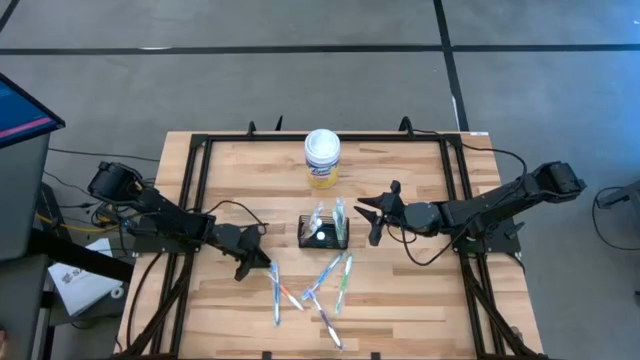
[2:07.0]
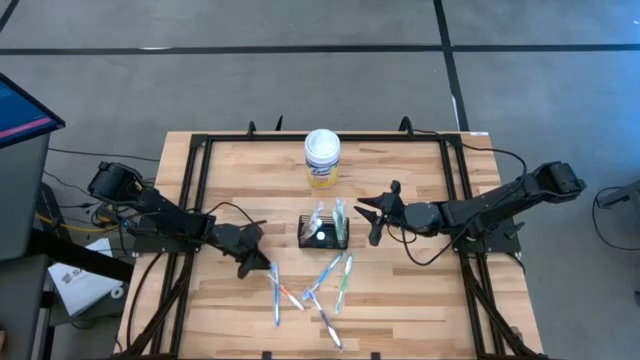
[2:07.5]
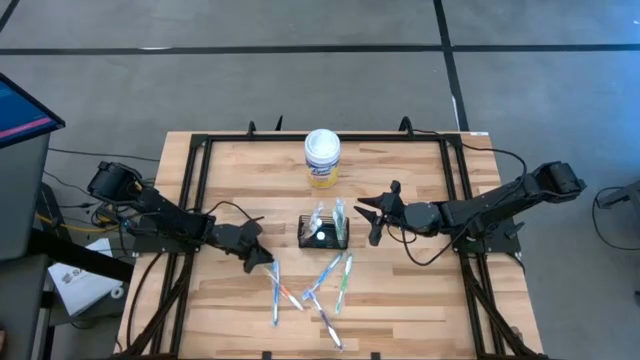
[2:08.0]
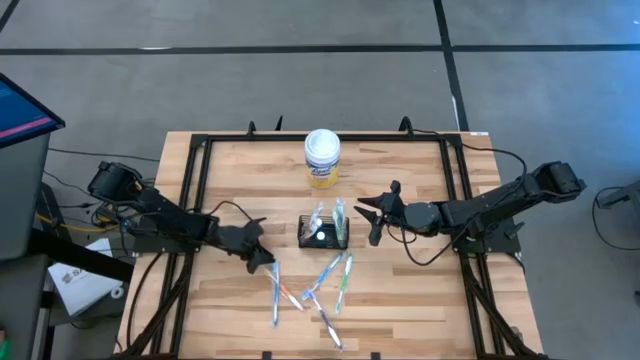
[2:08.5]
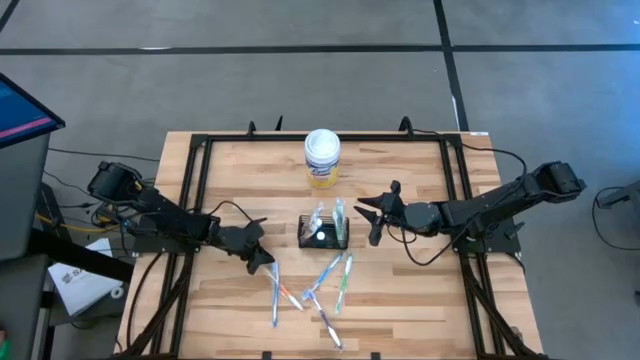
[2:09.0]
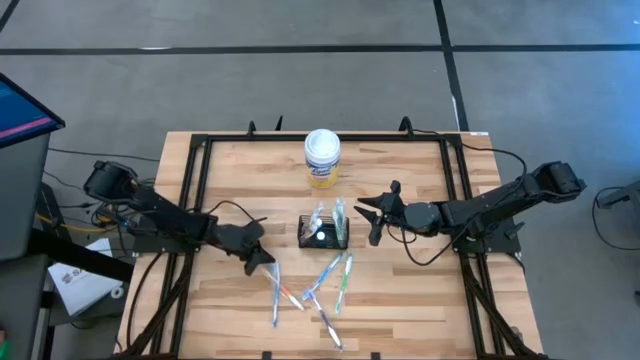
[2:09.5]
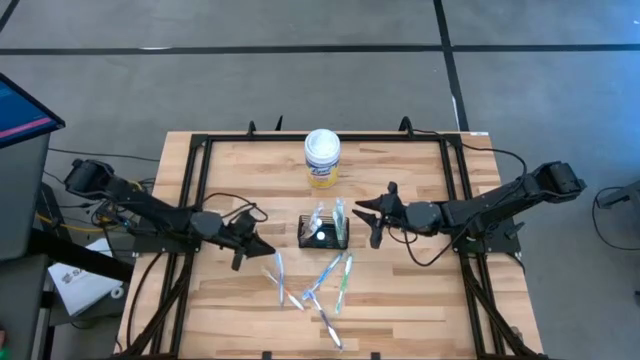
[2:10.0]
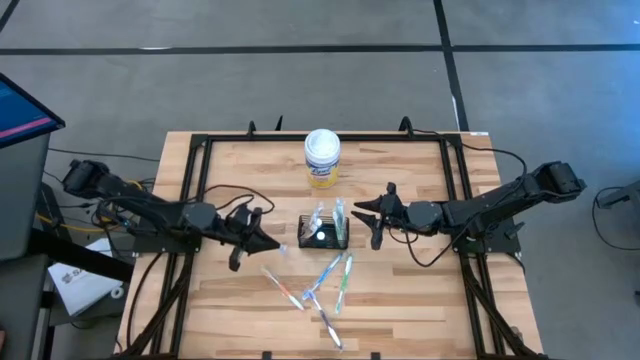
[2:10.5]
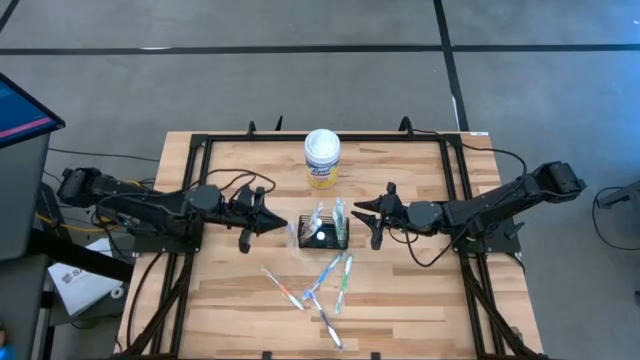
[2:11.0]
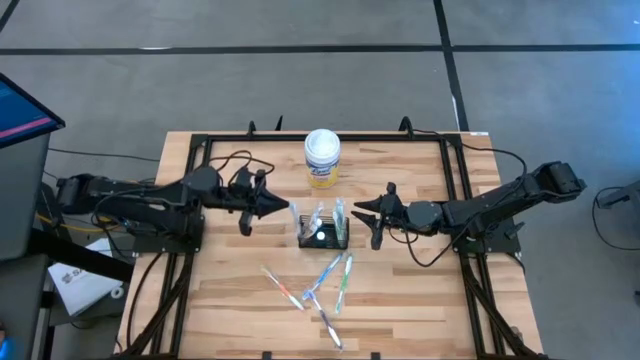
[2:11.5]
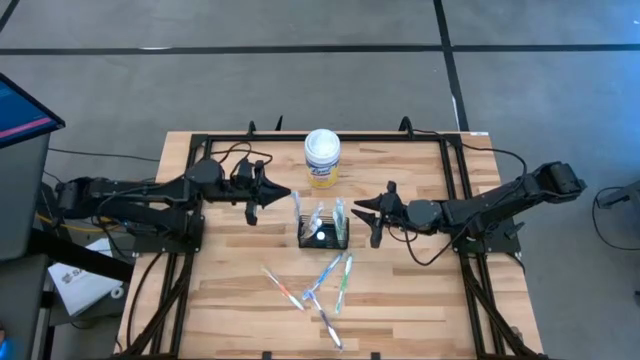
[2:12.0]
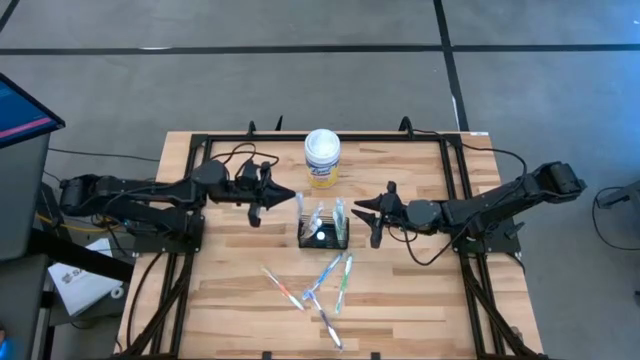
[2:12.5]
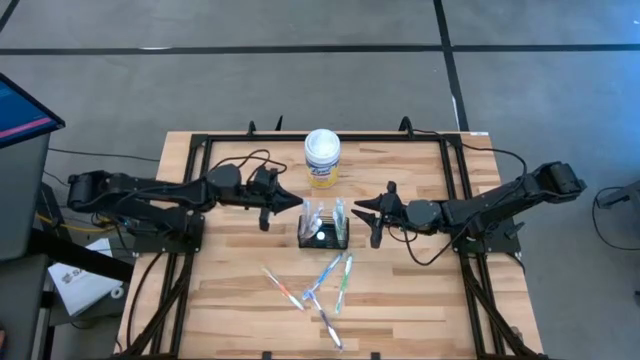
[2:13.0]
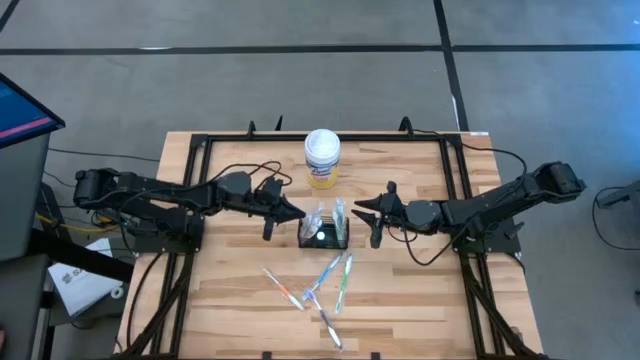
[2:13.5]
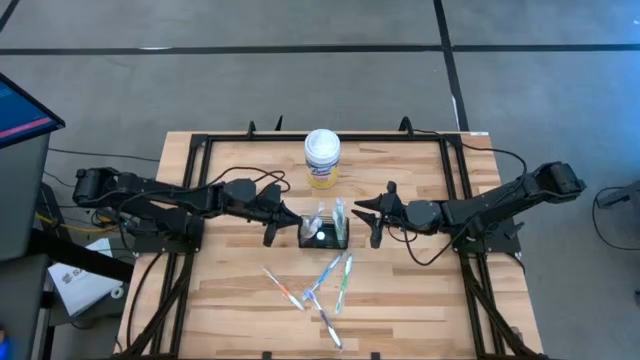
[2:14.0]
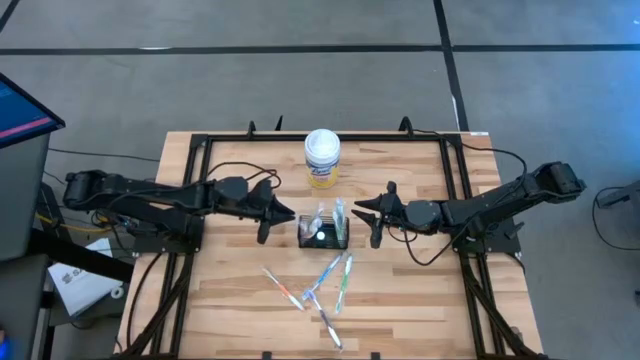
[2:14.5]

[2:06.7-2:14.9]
Task: Pick & Place toothbrushing station
Put the left blue toothbrush into the black mesh organizer

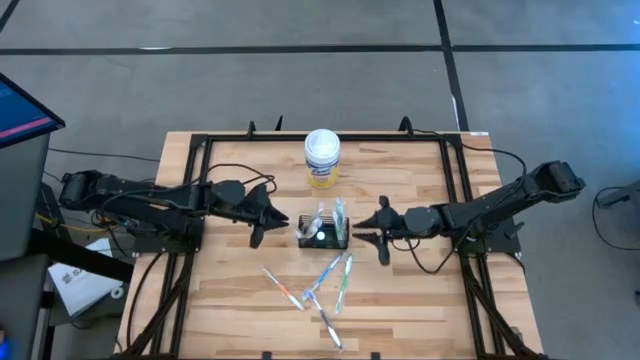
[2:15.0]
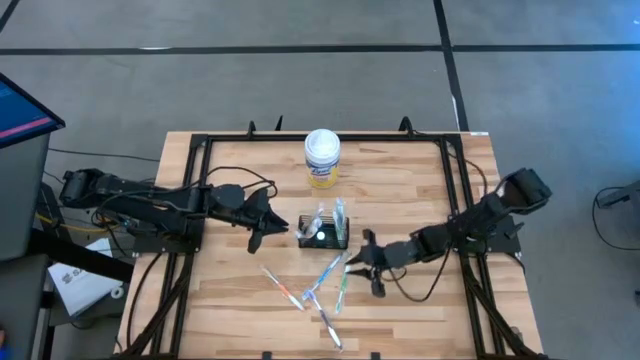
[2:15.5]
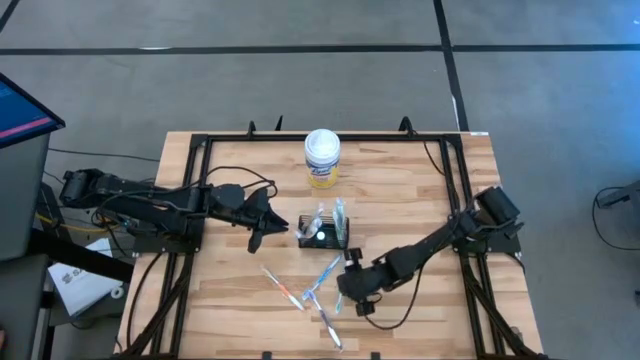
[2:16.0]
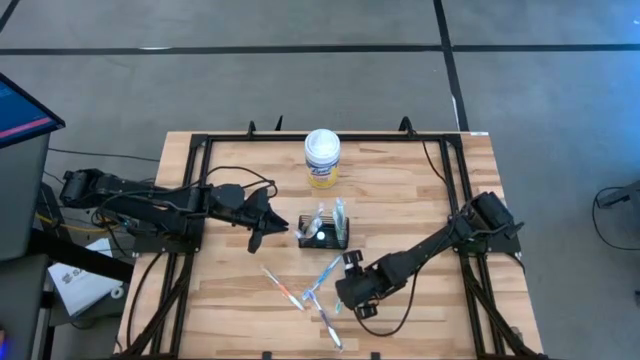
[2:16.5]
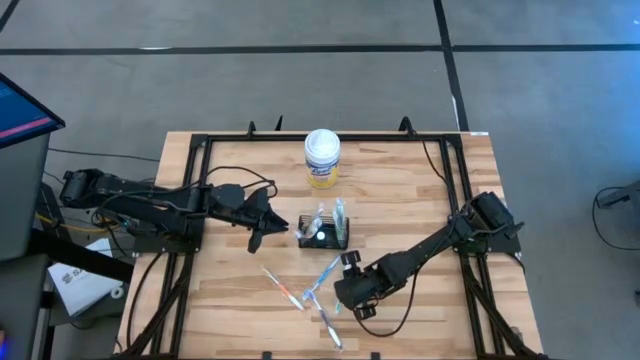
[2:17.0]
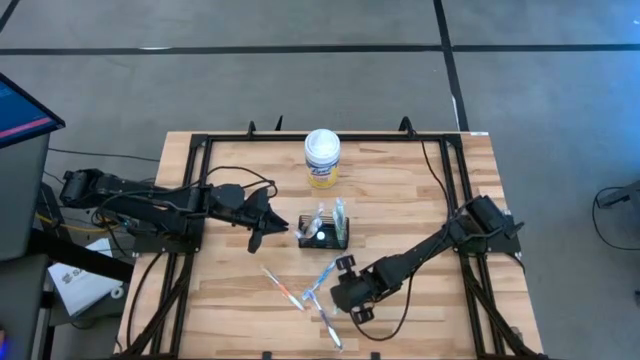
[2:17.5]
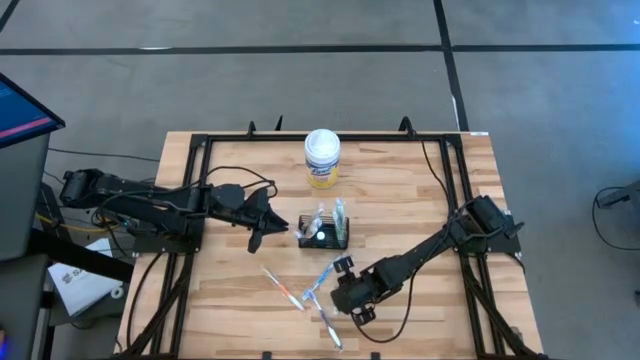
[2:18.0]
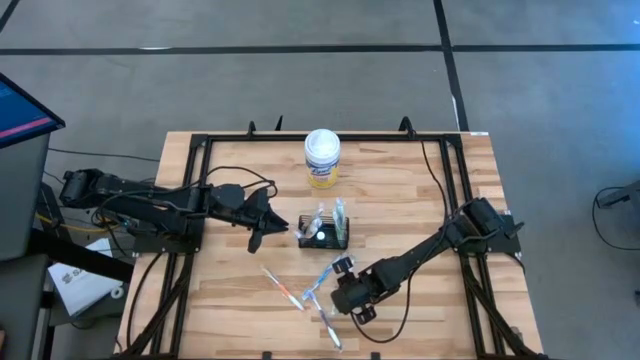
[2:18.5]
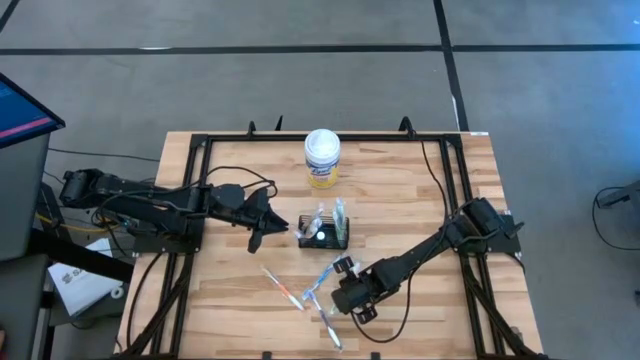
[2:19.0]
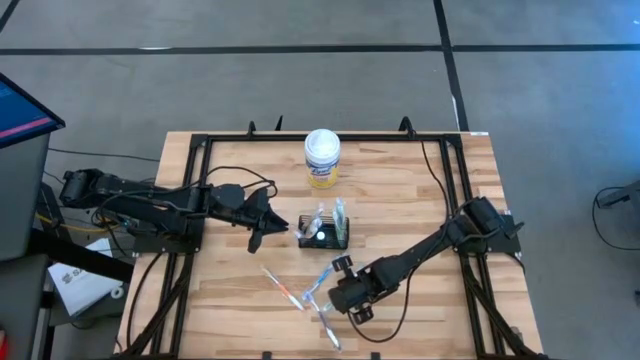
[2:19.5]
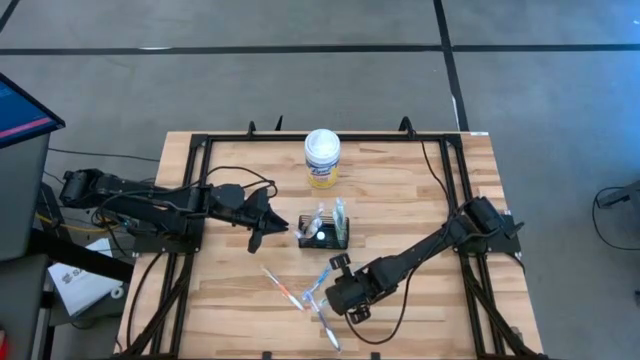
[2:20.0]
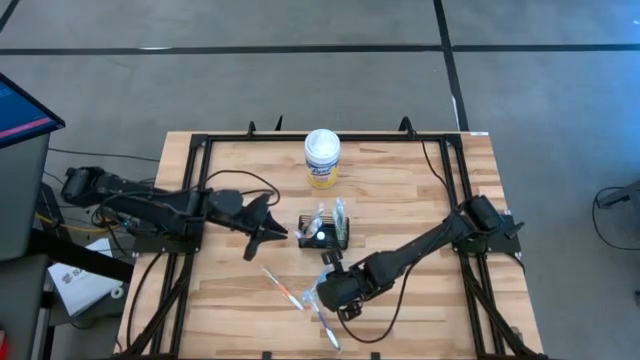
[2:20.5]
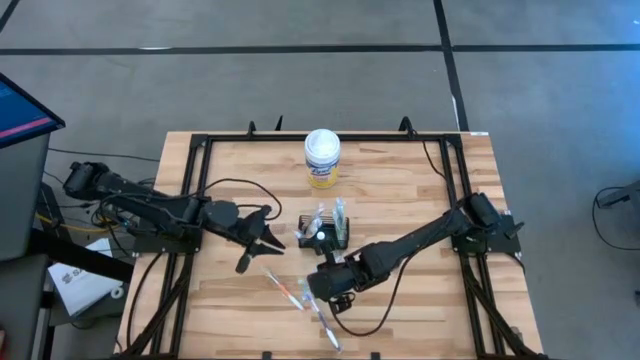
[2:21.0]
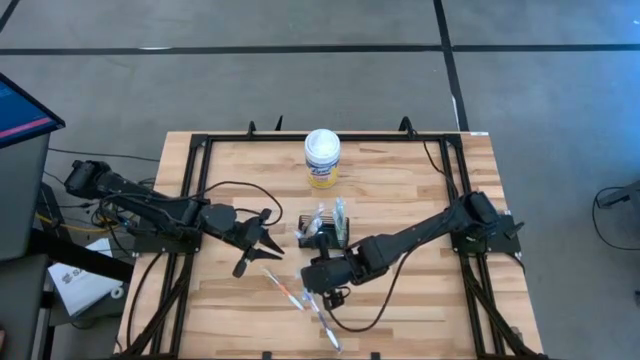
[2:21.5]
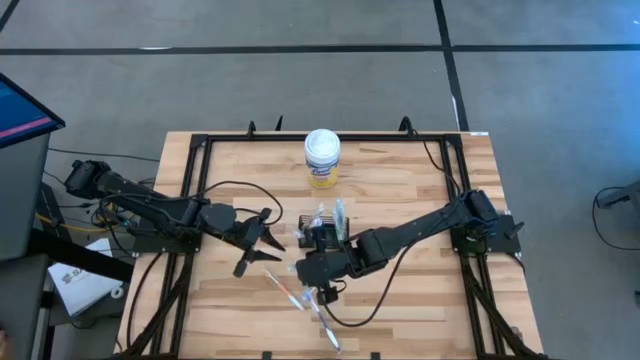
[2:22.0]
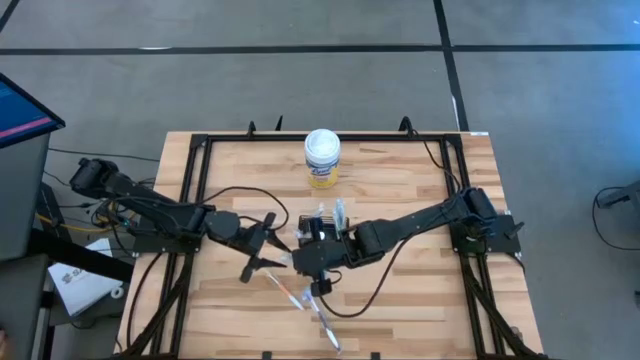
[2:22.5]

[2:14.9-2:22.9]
Put the green toothbrush into the black mesh organizer

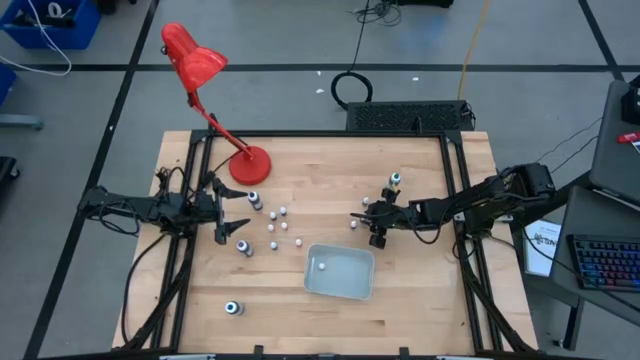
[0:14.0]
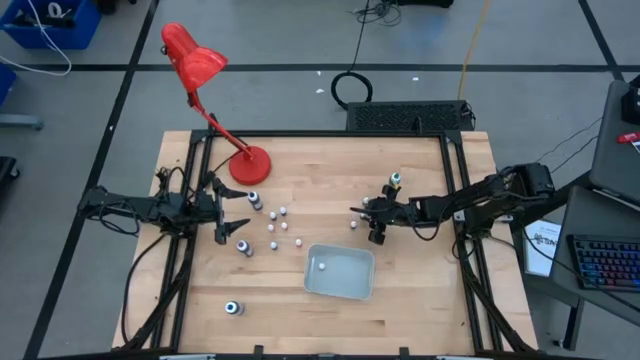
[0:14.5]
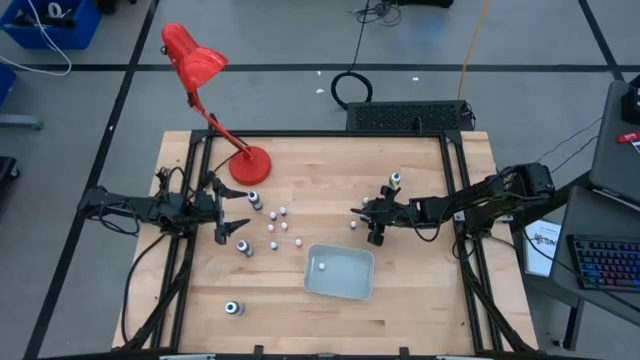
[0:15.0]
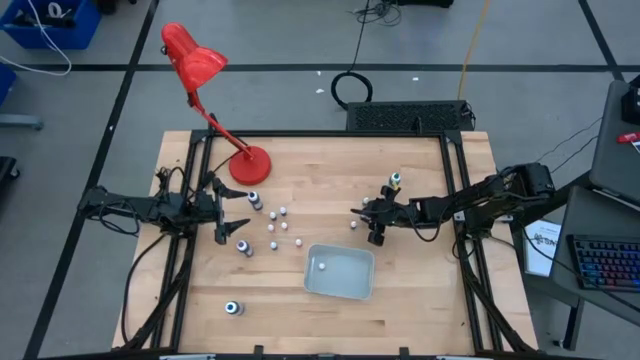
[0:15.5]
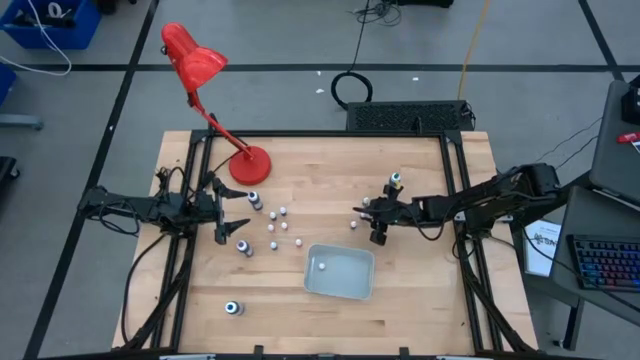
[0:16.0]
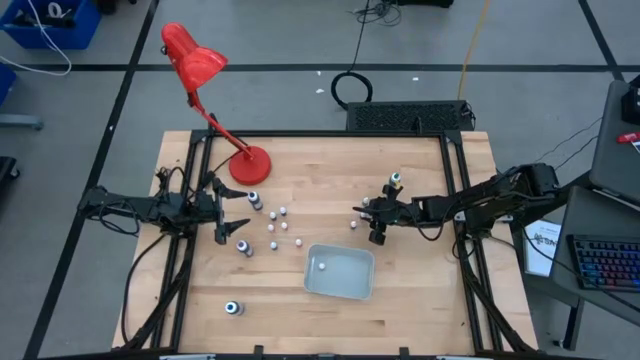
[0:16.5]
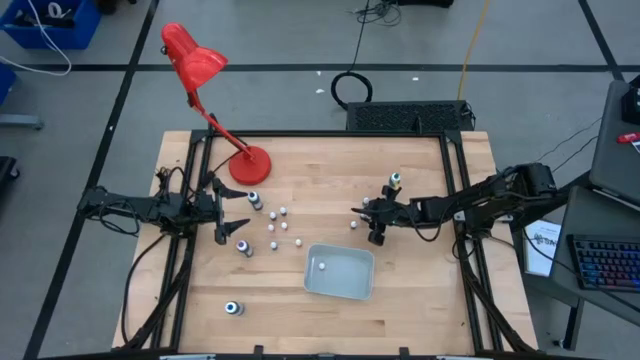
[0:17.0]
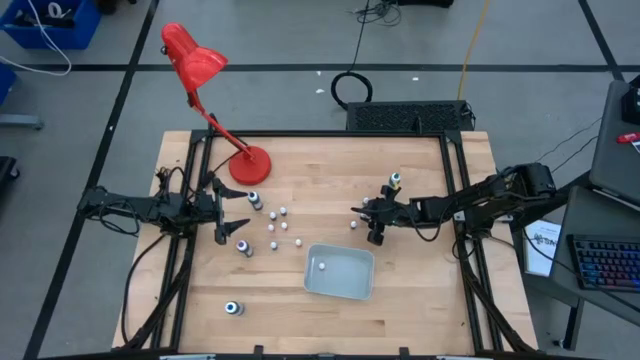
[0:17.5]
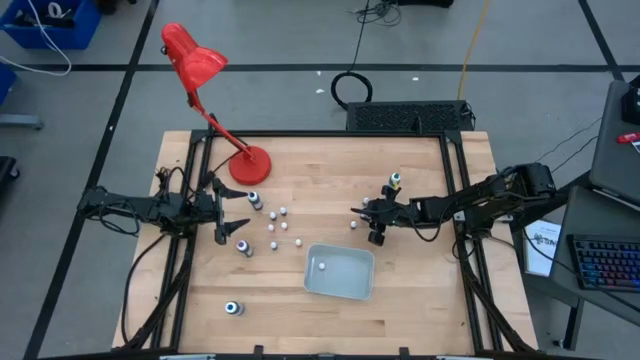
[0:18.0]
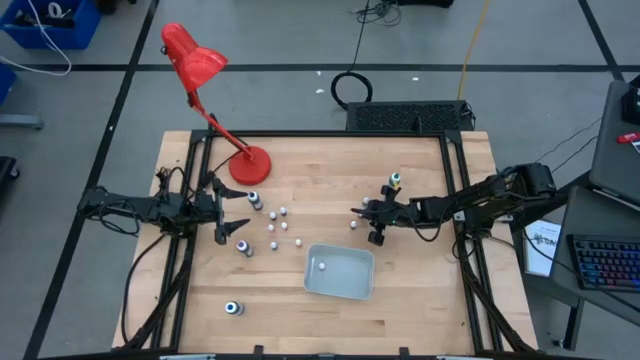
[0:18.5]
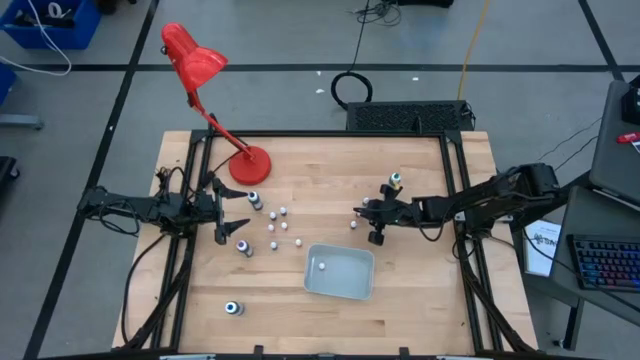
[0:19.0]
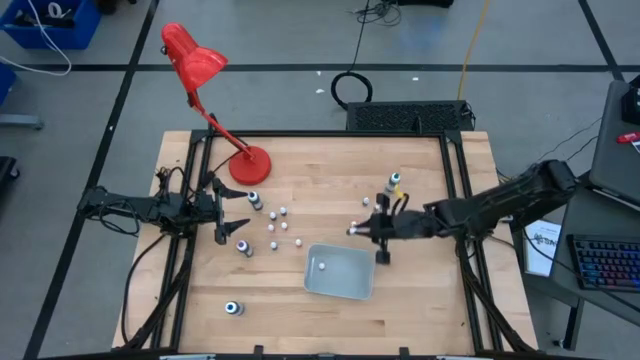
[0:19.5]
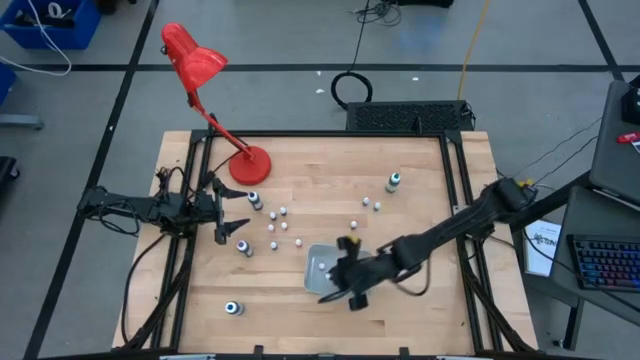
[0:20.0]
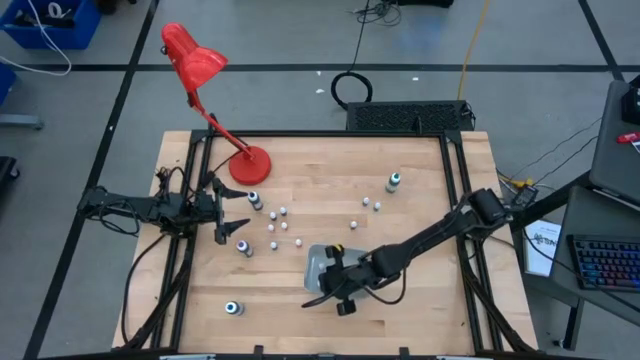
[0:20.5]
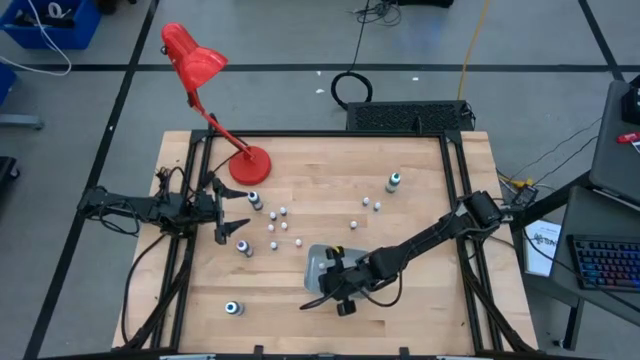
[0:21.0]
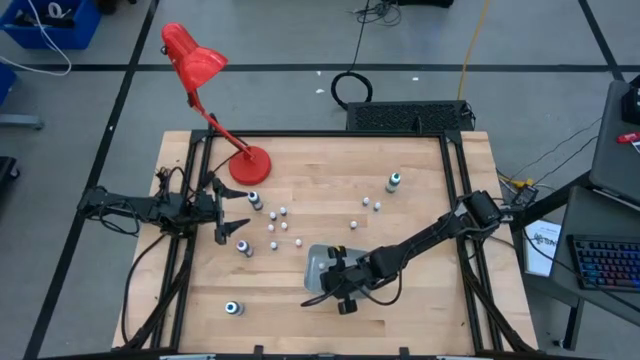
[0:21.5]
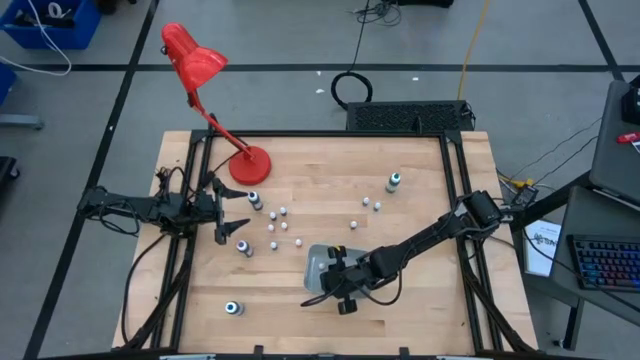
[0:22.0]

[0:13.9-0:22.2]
Task: Pick & Place food coloring
Put the small purple food coloring bottle into the gray bin
